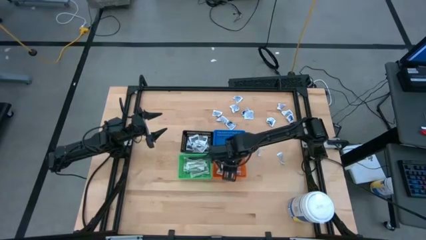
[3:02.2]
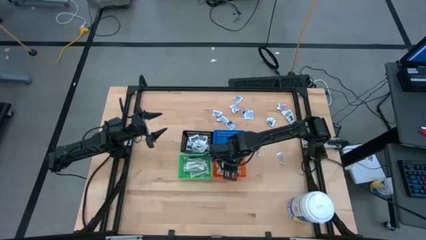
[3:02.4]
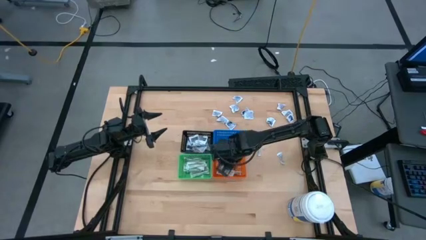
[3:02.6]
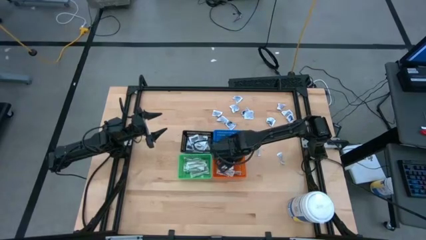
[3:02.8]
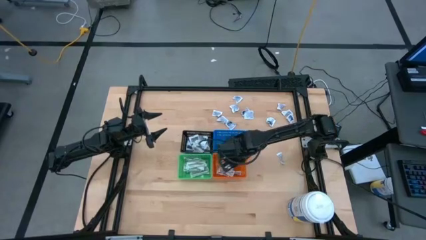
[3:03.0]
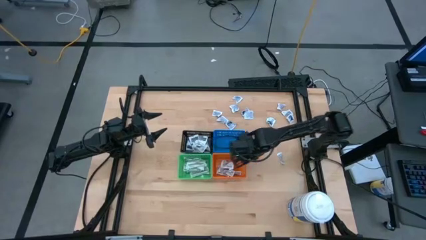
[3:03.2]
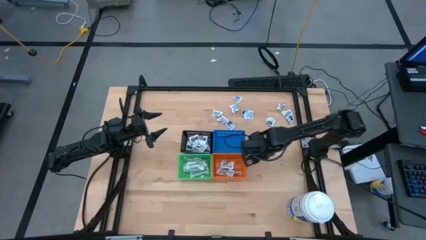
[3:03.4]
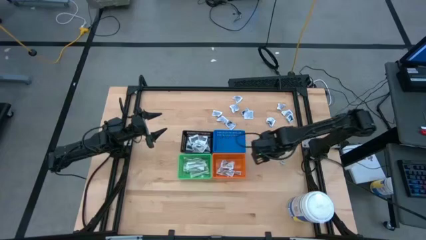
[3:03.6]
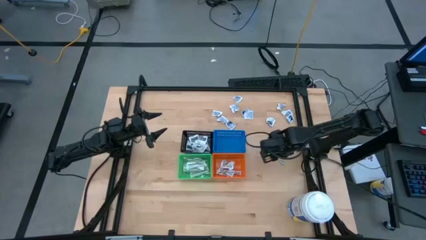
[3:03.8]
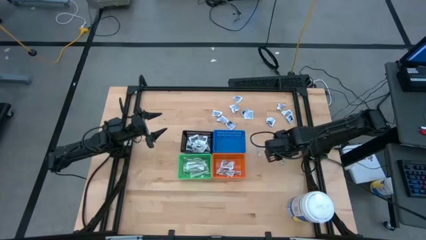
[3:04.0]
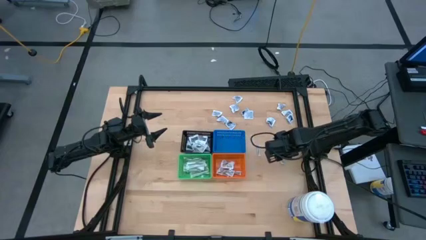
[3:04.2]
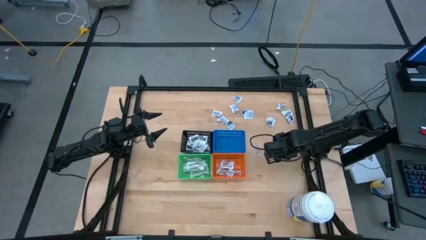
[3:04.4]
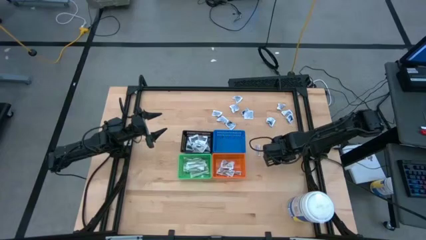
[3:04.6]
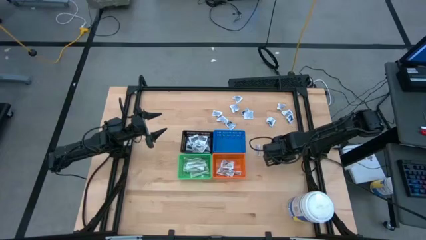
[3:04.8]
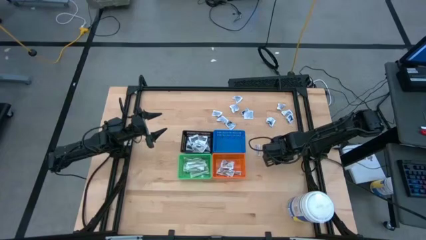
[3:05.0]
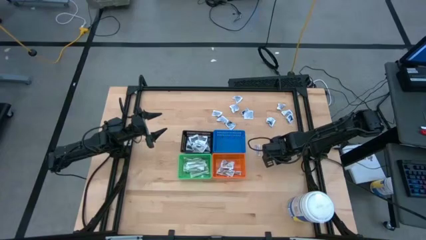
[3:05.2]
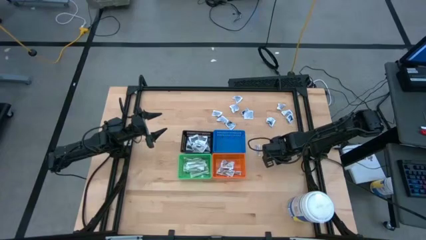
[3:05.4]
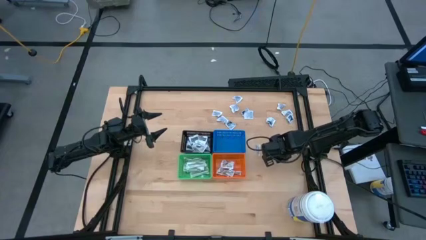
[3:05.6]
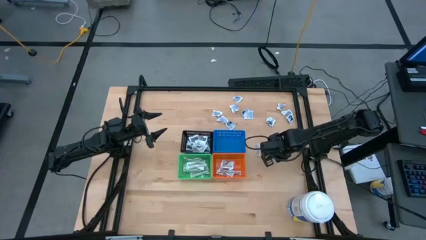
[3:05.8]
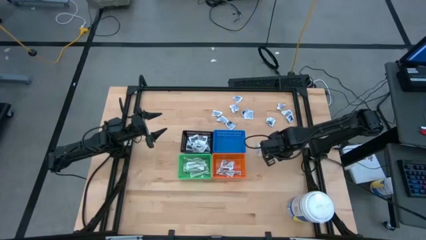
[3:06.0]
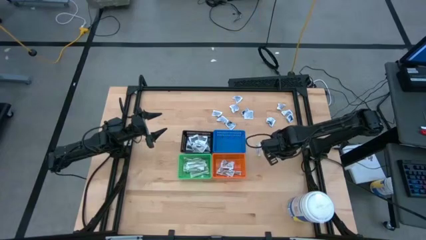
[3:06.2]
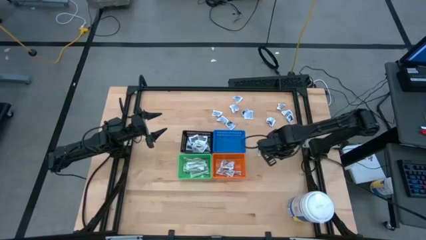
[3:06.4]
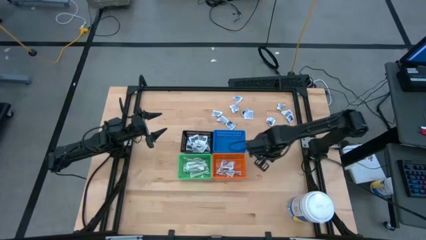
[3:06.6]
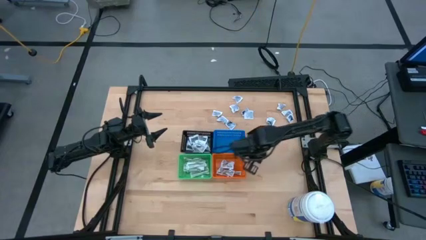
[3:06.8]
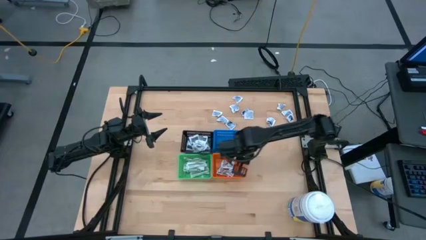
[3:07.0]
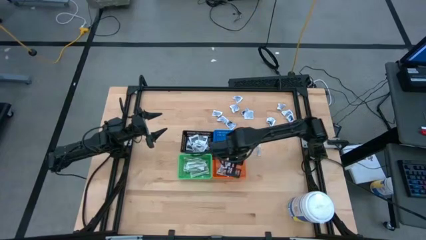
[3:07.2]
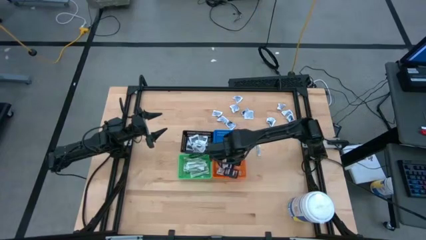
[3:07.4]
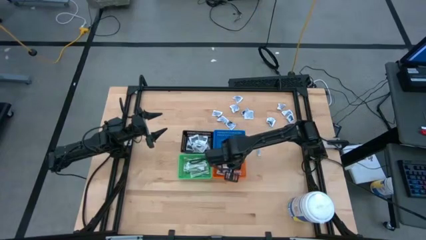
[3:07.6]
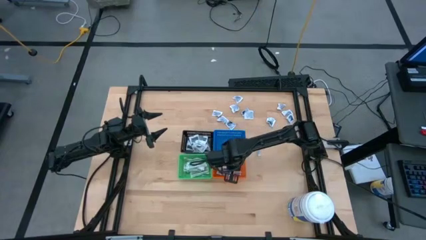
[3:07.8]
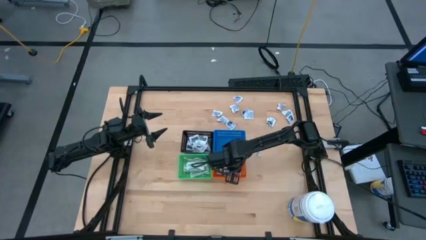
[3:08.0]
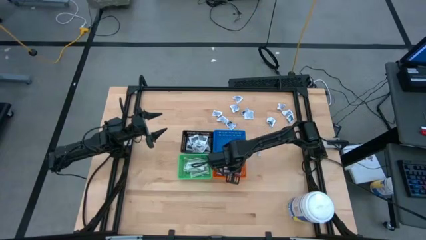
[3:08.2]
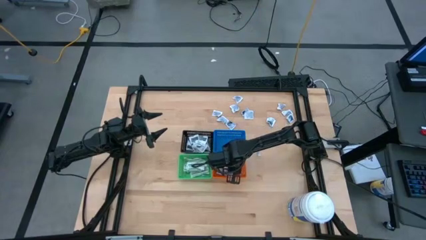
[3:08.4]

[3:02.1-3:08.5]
Task: Pick & Place First Aid Supplies
Put the ointment pack into the orange bin

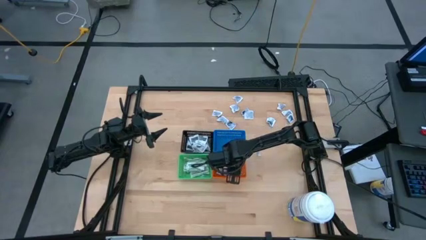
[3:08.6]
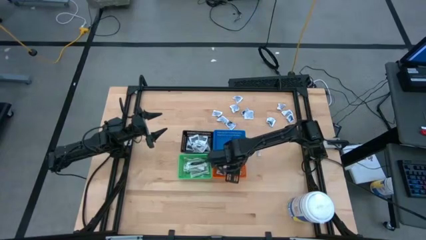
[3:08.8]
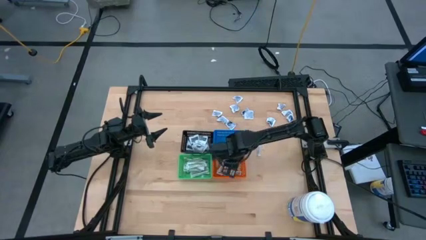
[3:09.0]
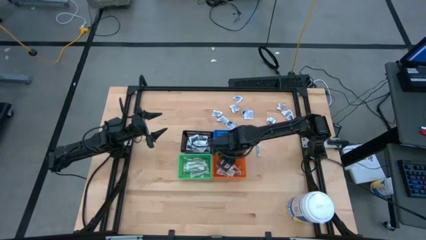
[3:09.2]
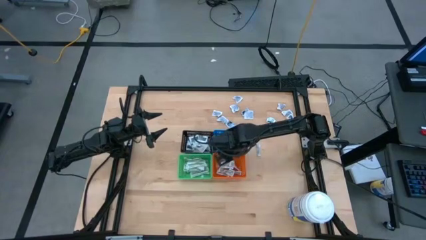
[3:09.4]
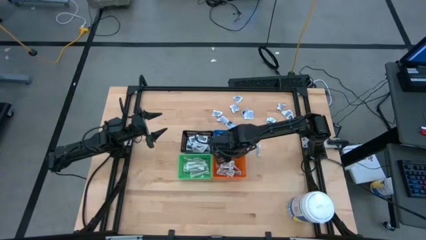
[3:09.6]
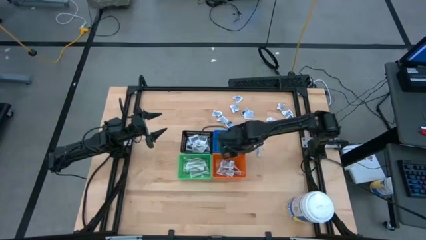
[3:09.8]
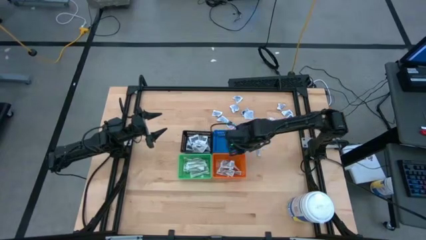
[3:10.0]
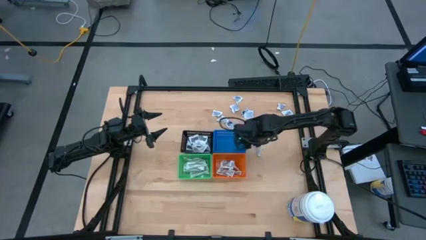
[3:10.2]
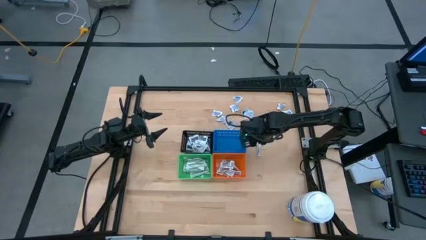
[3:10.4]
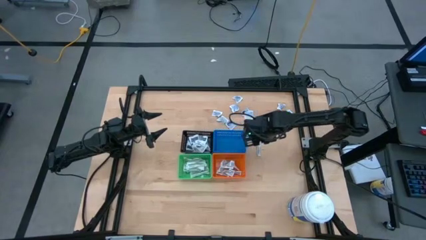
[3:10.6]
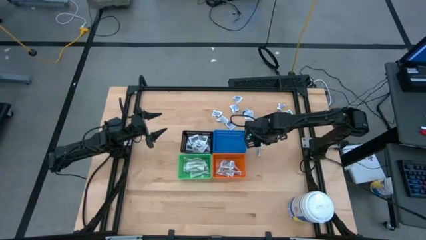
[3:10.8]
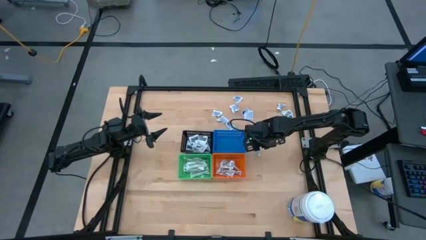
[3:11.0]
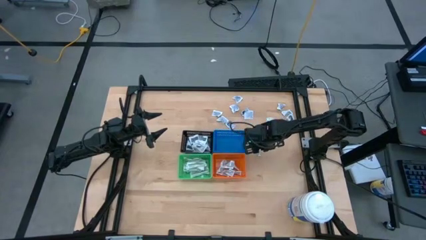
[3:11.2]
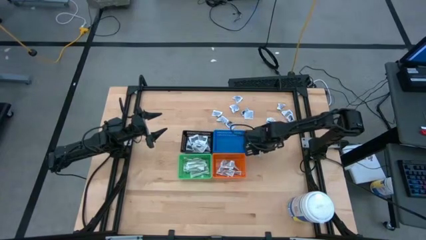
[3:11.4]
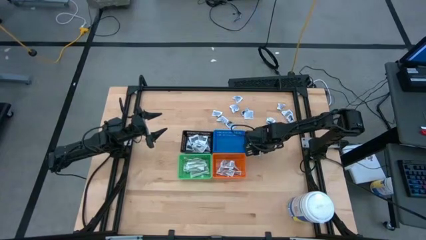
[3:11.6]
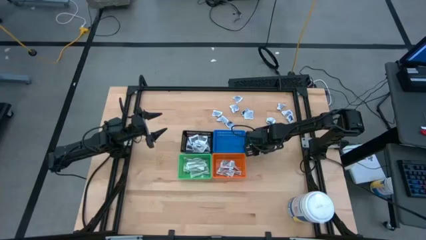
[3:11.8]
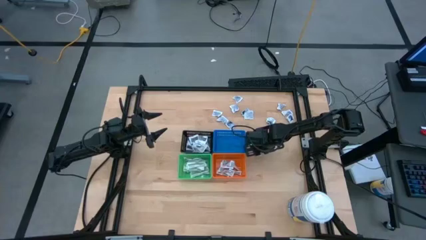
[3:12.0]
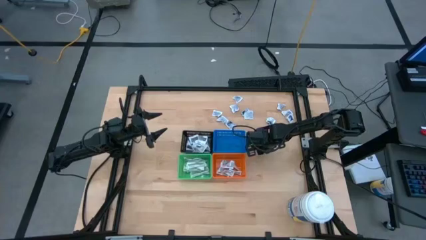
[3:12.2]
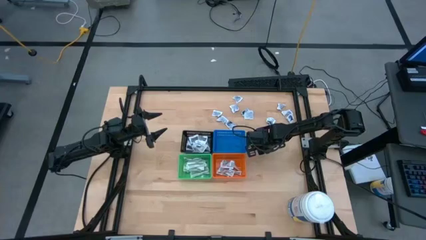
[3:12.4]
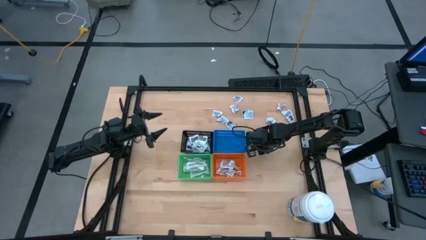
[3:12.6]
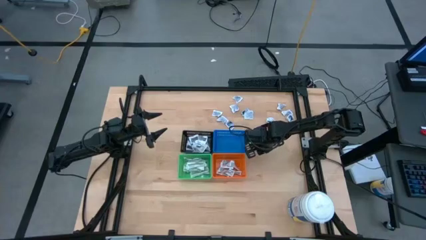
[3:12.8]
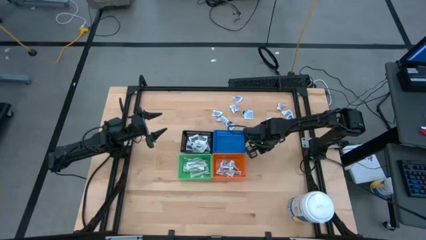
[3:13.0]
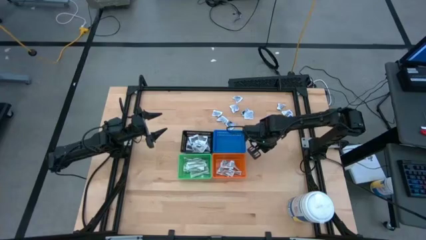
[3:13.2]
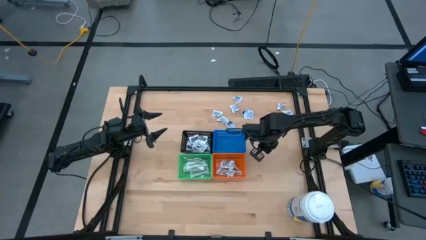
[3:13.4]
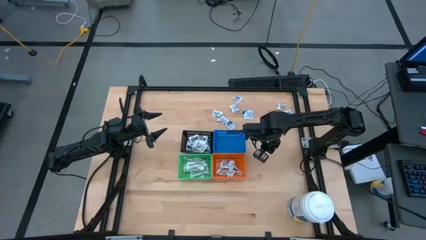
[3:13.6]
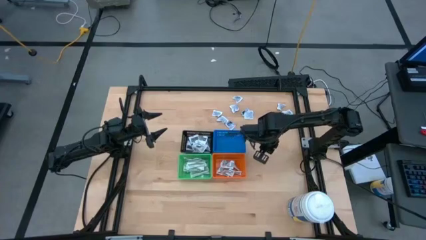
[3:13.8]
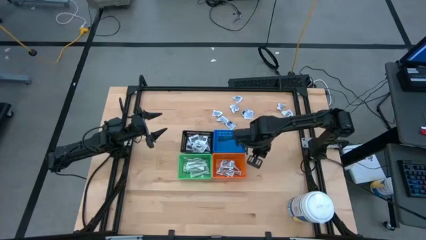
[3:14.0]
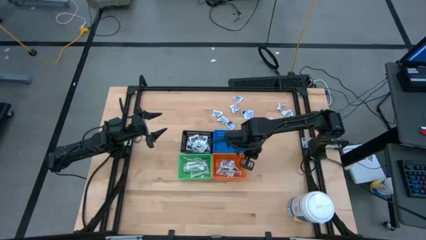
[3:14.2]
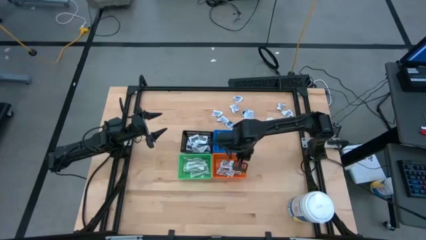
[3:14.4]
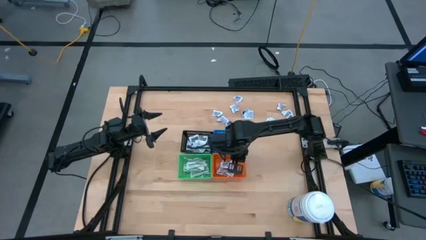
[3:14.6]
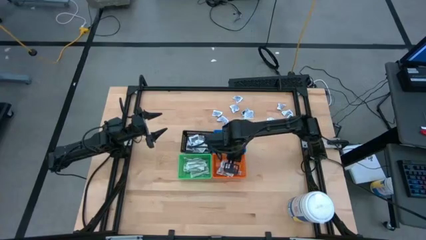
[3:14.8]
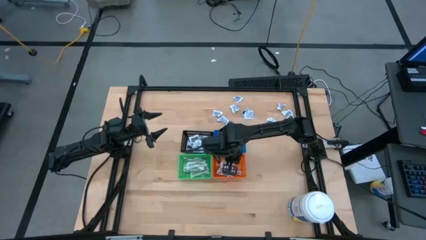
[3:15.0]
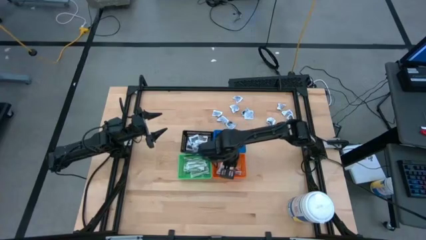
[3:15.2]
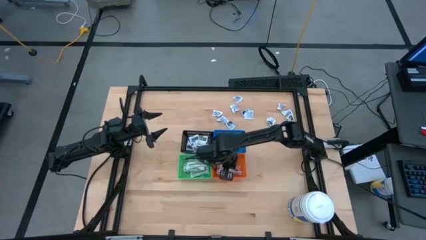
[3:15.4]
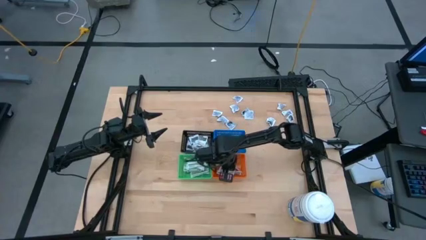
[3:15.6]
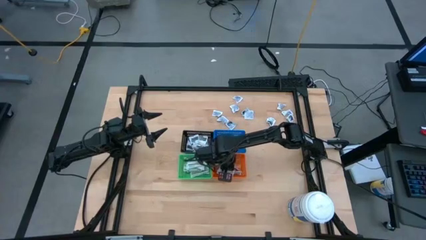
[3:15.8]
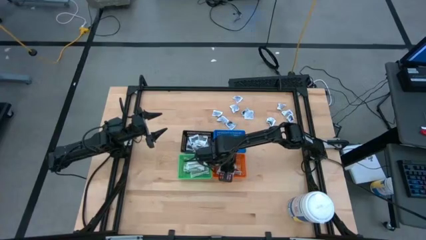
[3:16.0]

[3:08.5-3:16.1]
Put the ointment pack into the orange bin

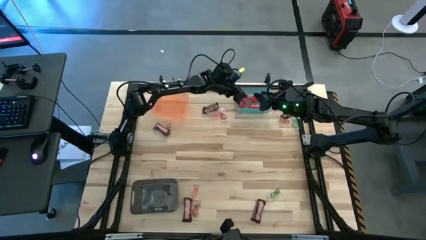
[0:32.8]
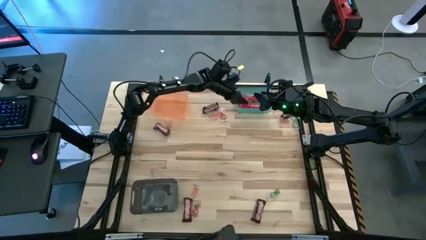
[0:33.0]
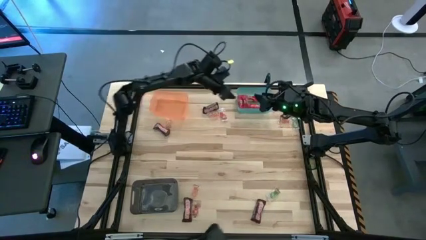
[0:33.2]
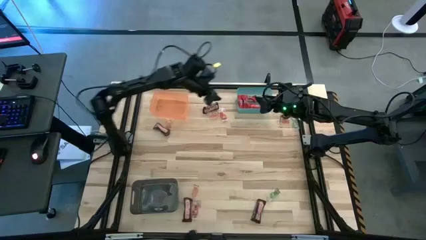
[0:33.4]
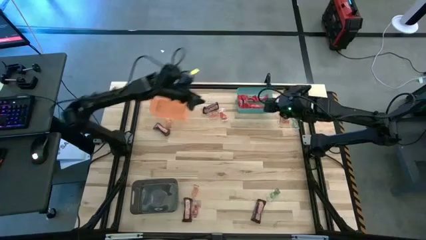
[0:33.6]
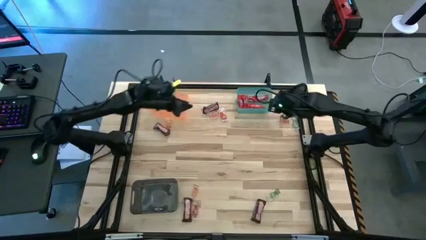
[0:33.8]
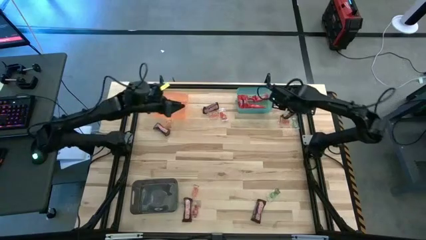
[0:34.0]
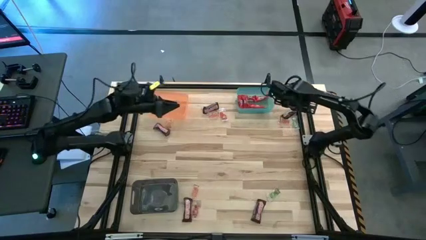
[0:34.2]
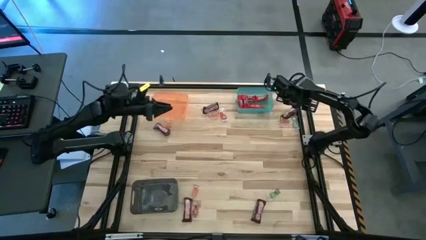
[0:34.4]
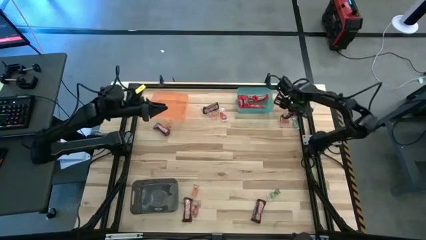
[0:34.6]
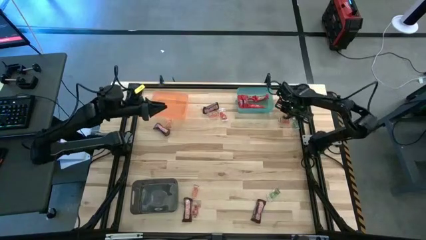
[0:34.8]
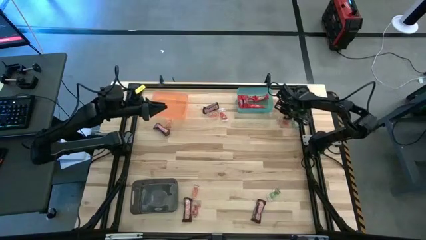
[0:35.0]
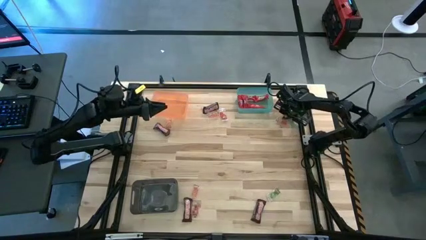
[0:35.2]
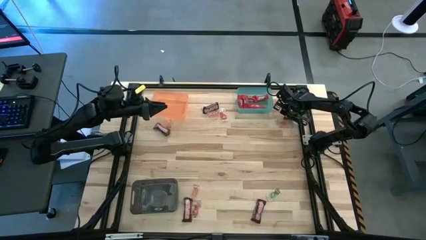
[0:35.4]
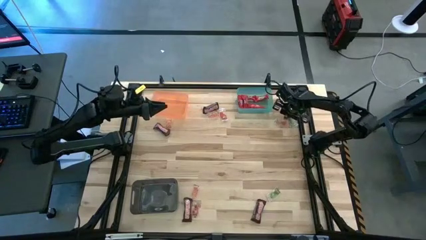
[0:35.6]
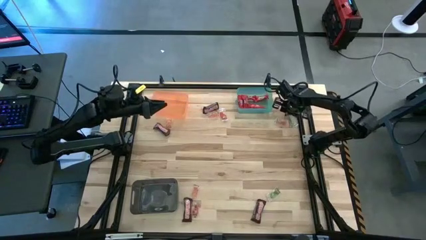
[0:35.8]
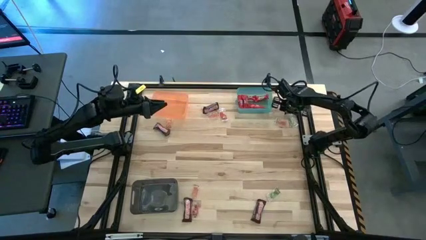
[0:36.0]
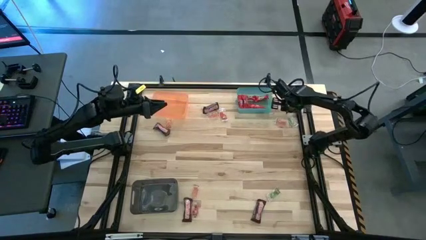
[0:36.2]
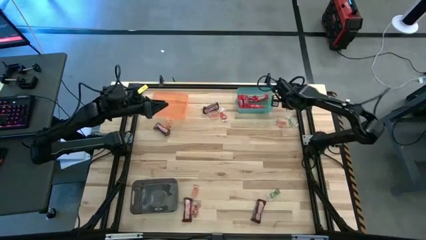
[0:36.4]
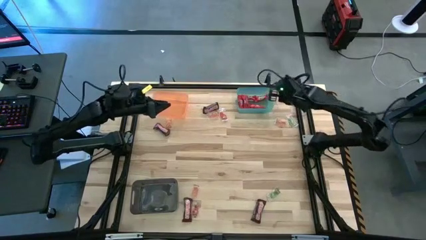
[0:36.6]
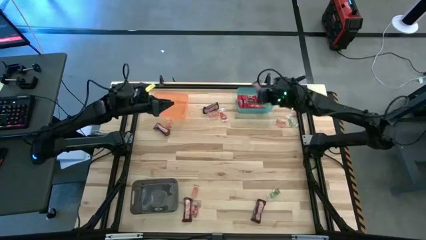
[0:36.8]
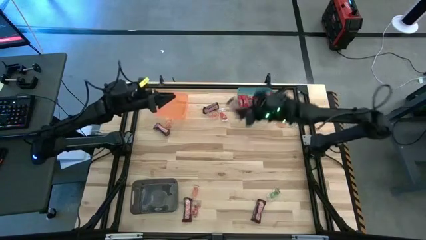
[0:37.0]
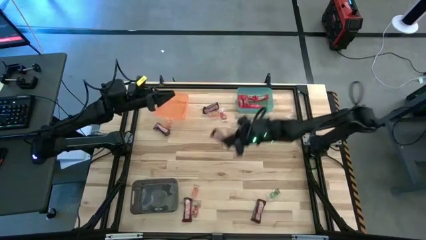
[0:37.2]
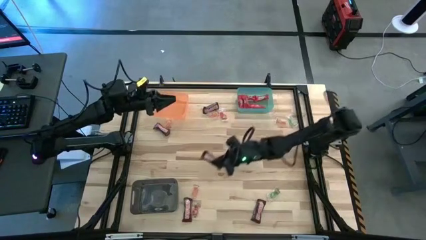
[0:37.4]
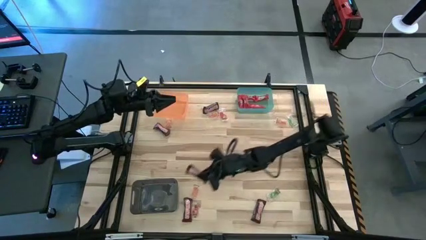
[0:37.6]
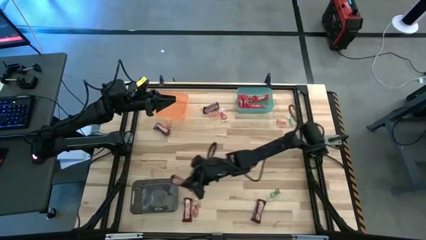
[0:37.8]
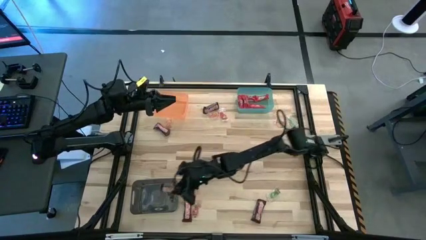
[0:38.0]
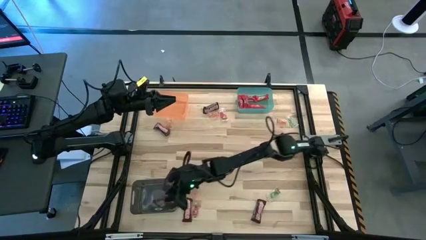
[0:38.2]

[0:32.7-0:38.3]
Task: Sort candy by brand, put in halloween buckets
Put the brown chocolate bar into the black bin
